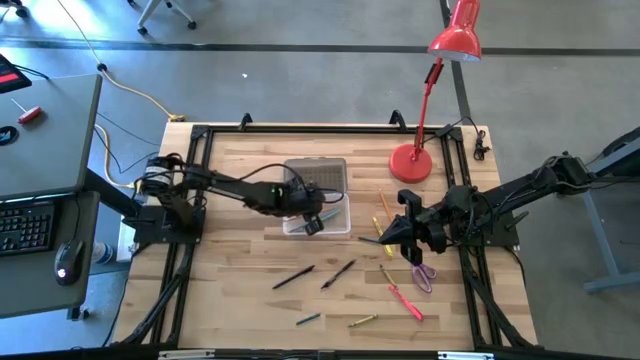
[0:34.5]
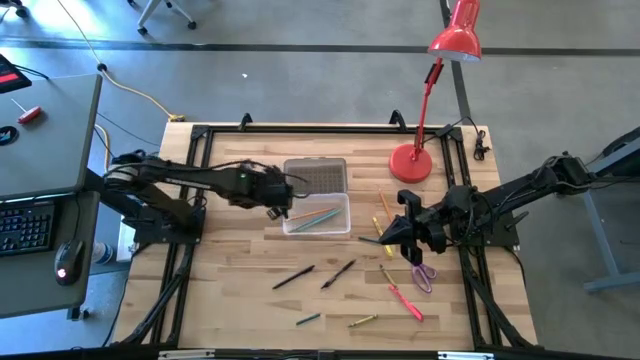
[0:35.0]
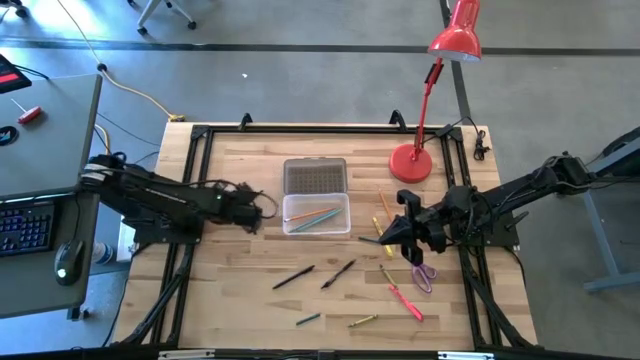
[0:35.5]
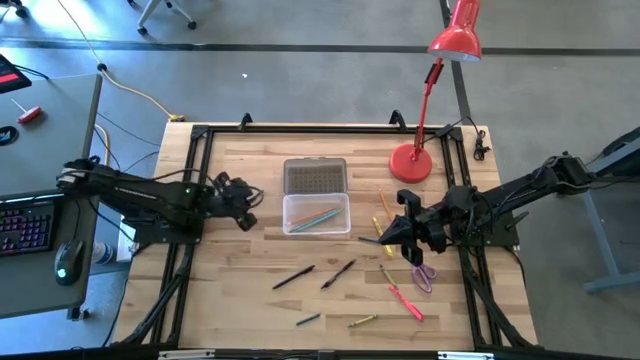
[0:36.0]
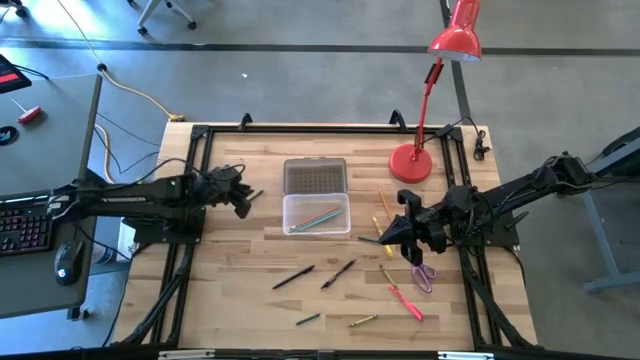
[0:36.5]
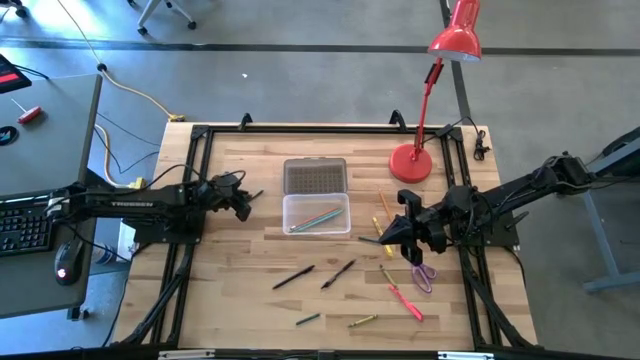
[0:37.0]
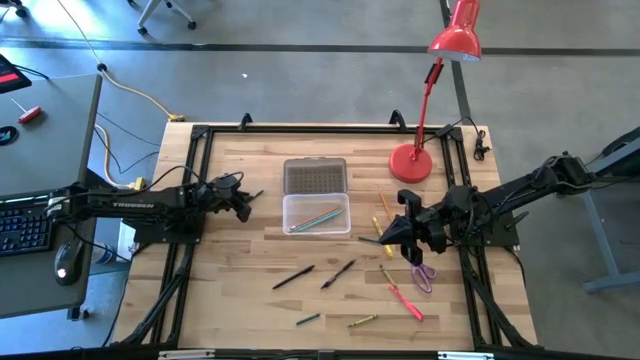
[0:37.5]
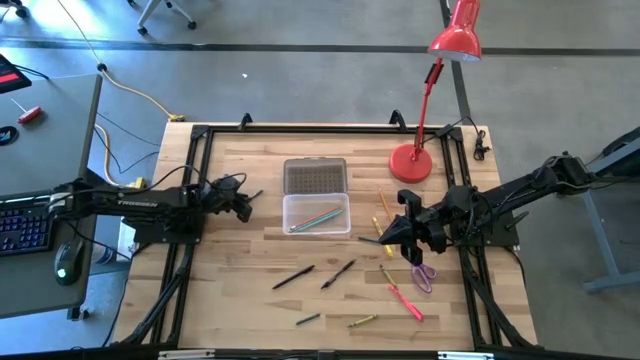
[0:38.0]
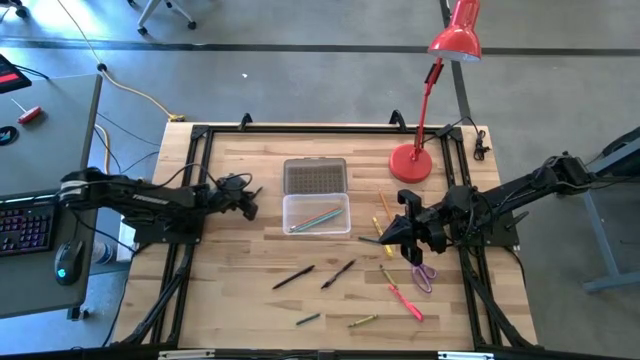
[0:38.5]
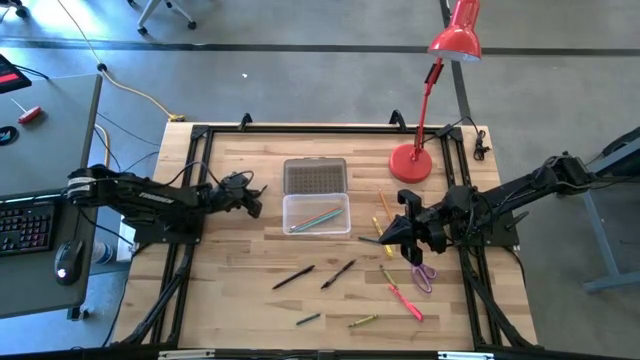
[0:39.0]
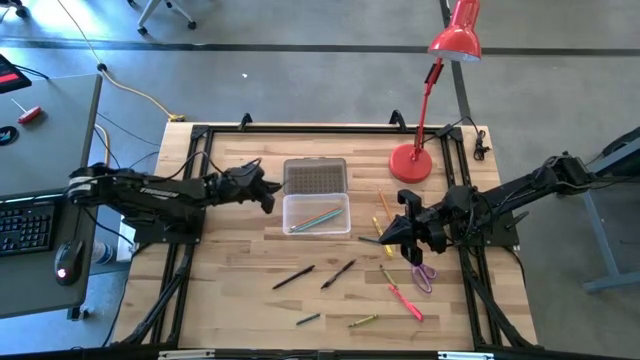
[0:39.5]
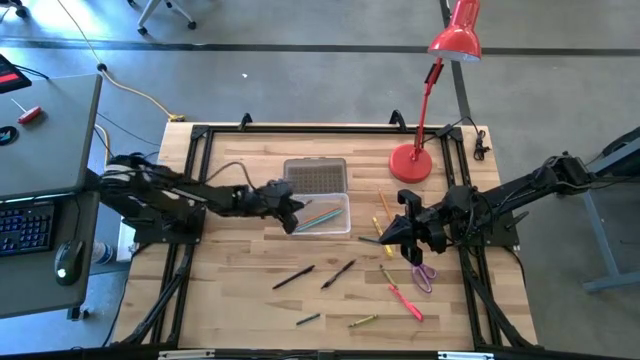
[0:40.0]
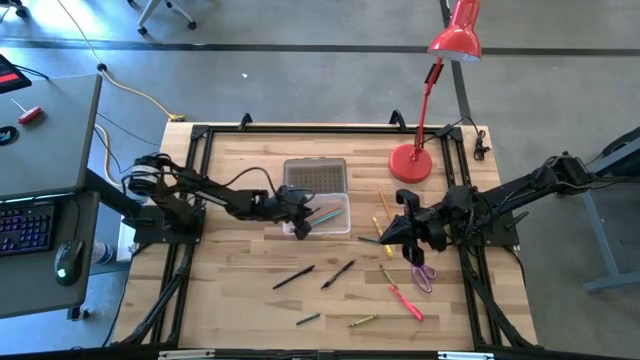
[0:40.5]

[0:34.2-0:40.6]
Task: Pick & place school supplies into a supply box
Put the dark green crayon into the supply box

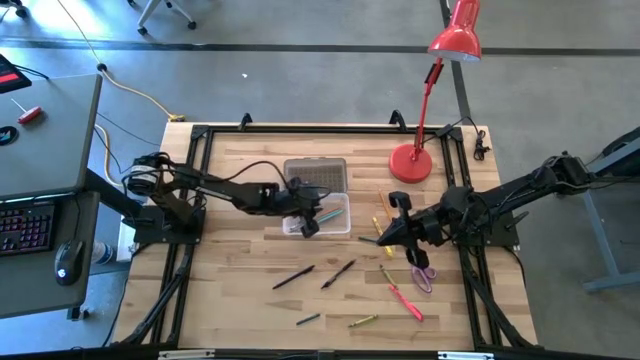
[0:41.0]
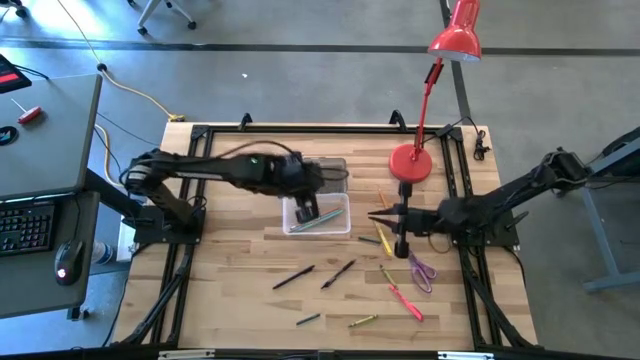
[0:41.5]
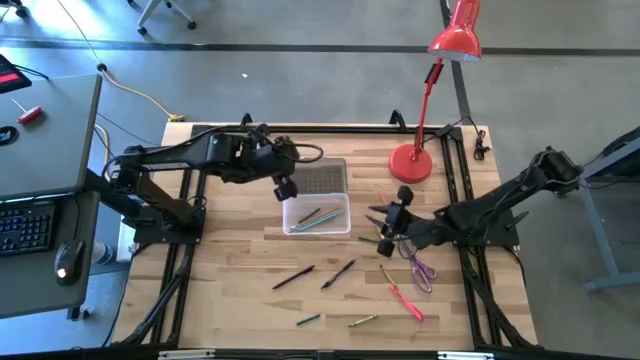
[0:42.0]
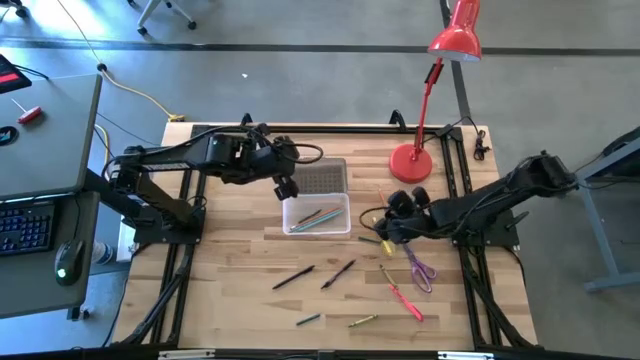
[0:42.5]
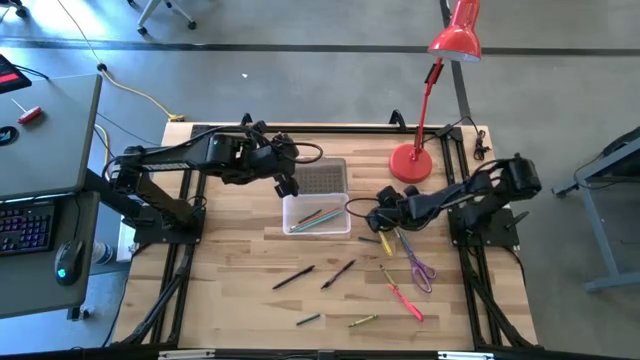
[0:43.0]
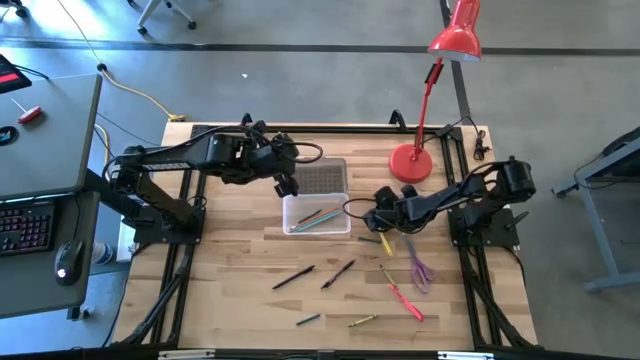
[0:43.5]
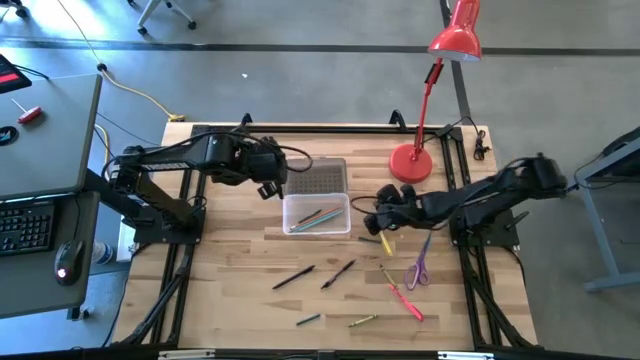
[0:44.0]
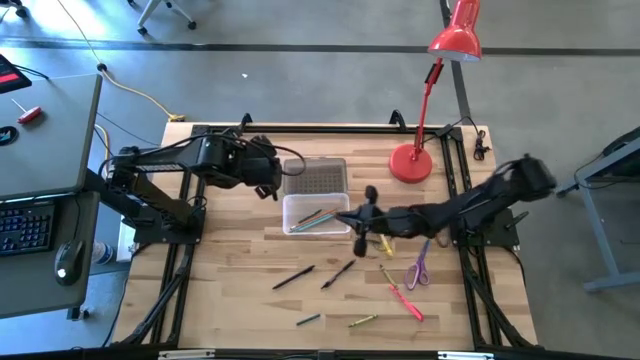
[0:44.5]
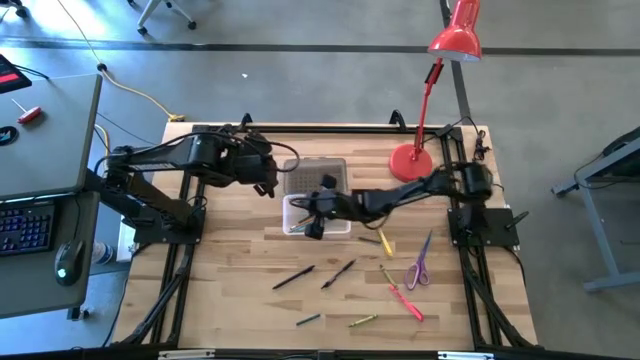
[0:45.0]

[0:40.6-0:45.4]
Put the orange pencil into the supply box

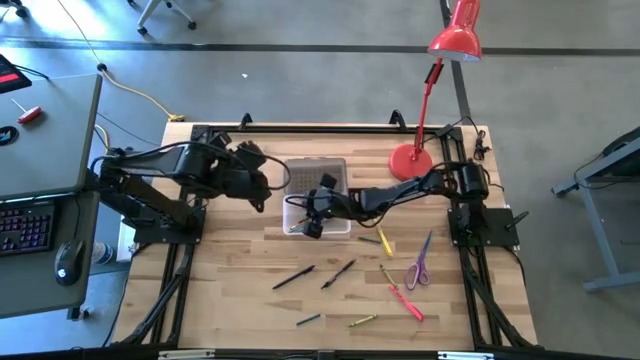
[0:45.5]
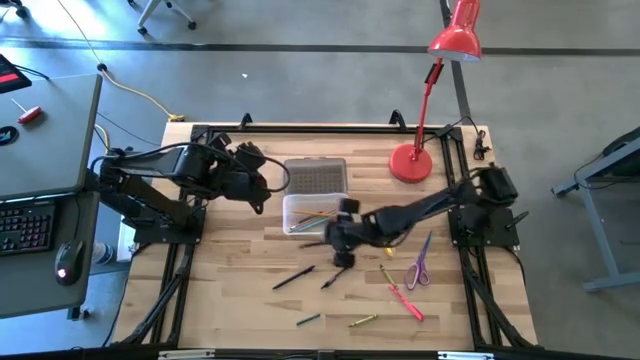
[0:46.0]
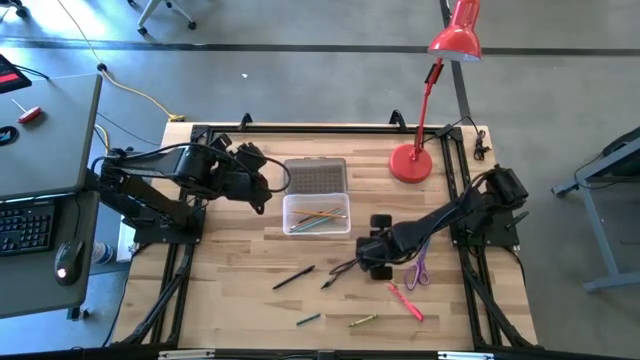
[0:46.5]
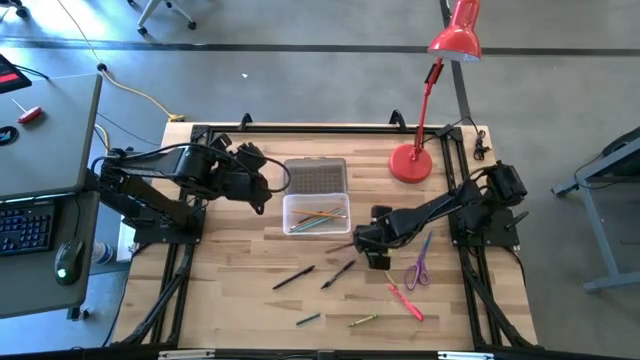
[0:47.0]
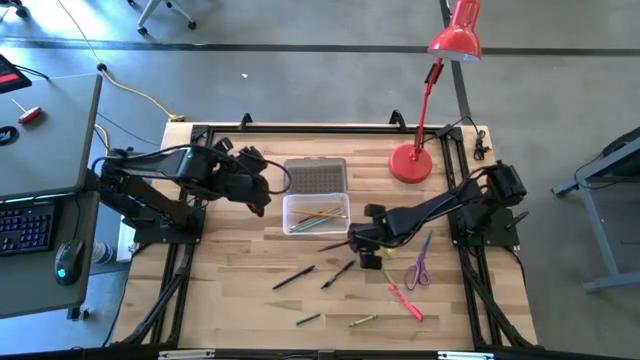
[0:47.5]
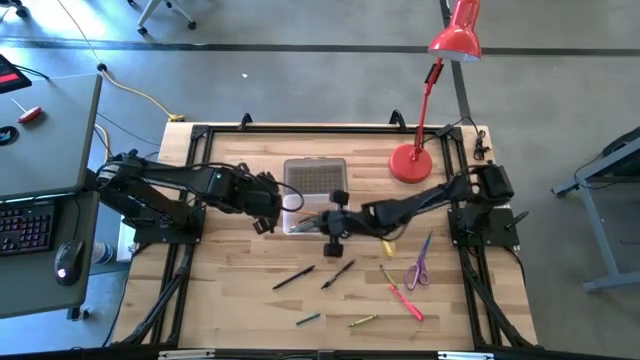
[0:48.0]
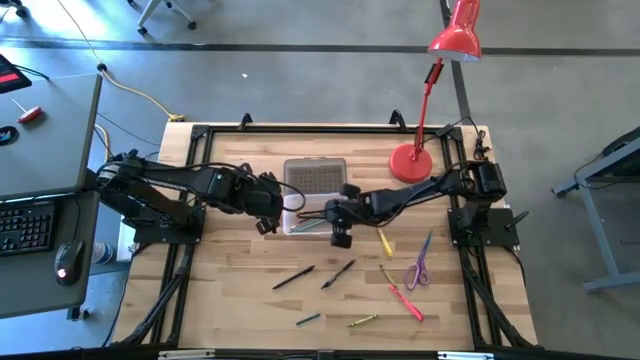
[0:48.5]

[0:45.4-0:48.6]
Put the dark green crayon into the supply box

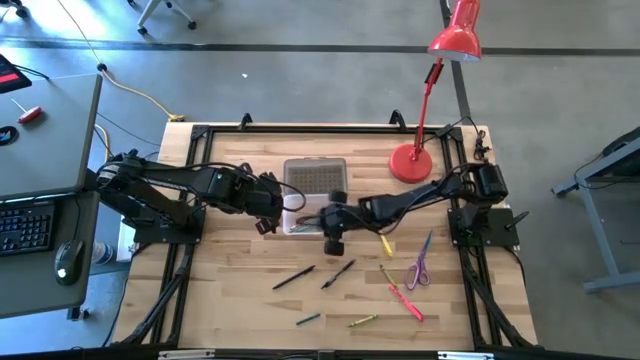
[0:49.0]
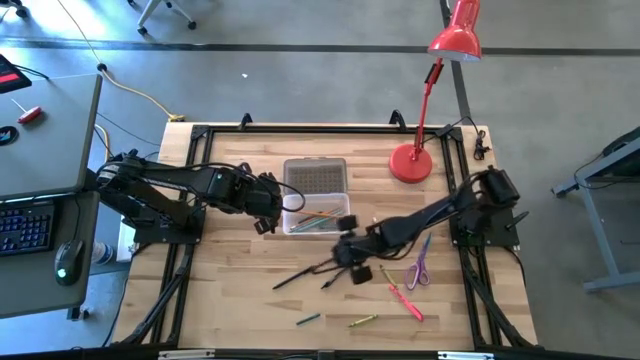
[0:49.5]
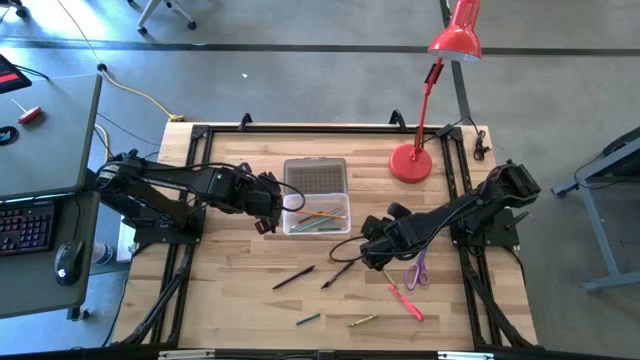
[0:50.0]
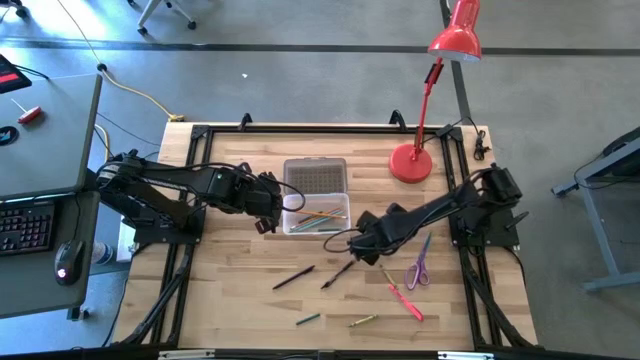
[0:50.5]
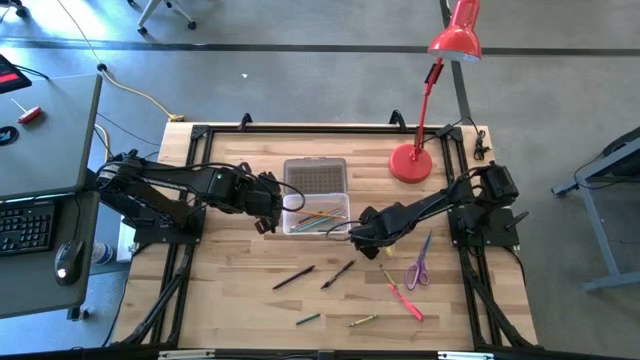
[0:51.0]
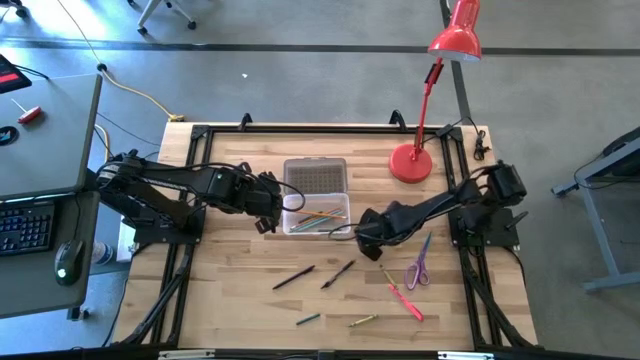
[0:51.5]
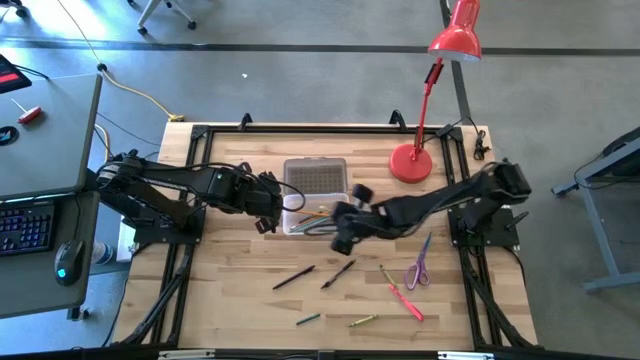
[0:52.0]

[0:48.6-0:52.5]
Put the yellow pen into the supply box

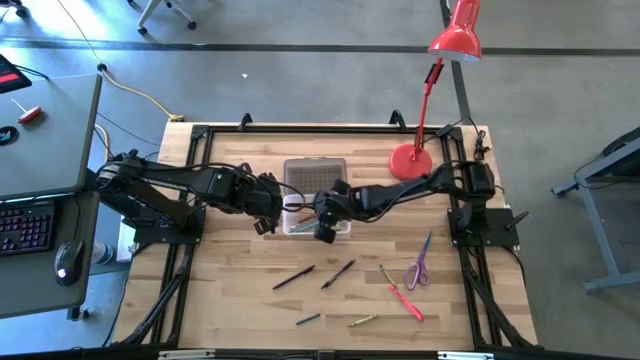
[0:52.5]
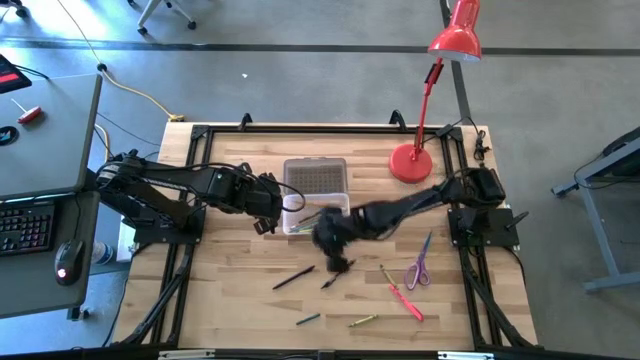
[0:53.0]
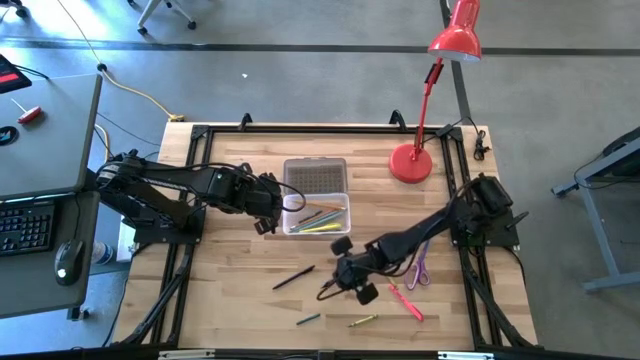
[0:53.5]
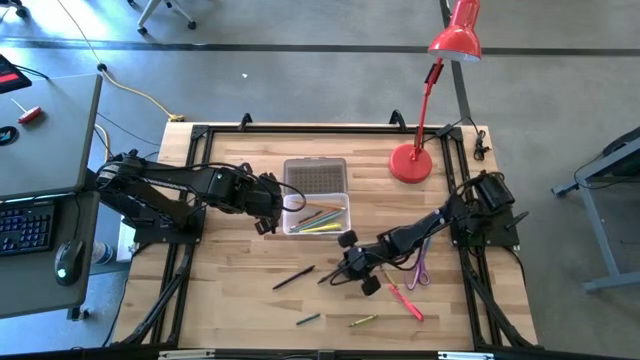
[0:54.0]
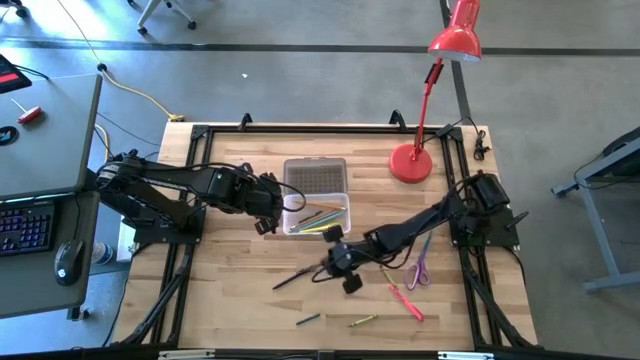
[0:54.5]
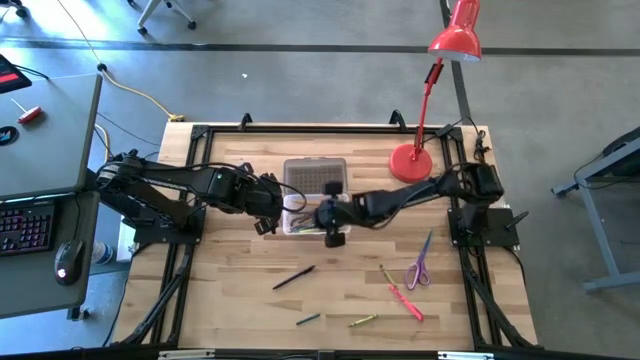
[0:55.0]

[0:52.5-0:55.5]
Put the black pen into the supply box
